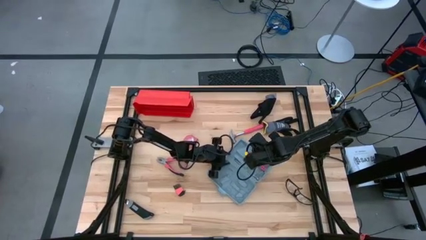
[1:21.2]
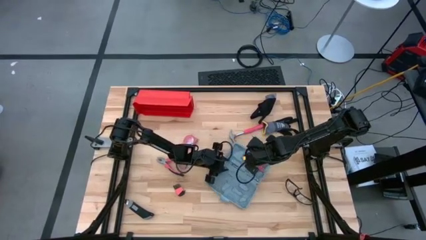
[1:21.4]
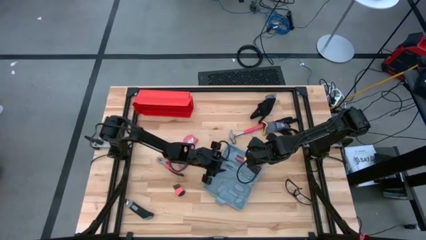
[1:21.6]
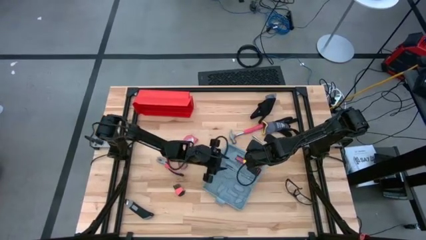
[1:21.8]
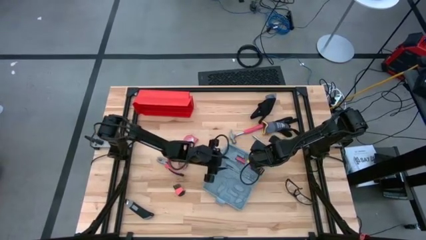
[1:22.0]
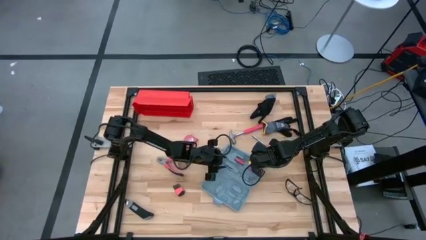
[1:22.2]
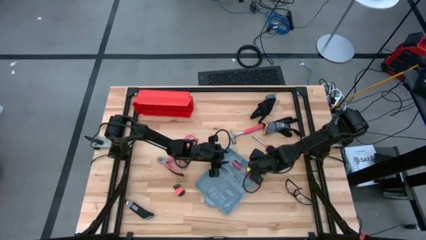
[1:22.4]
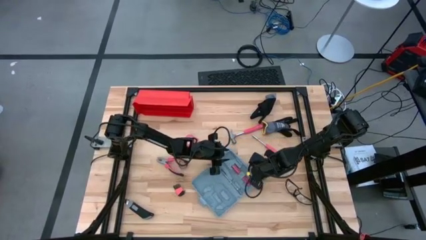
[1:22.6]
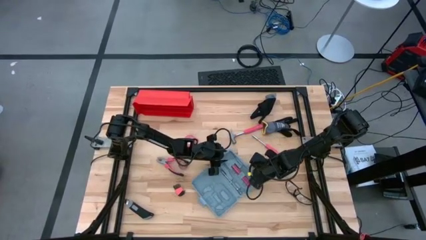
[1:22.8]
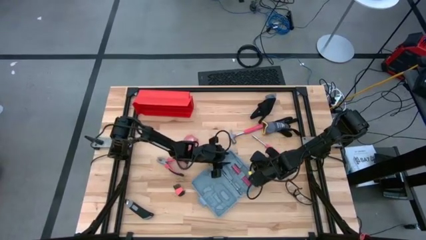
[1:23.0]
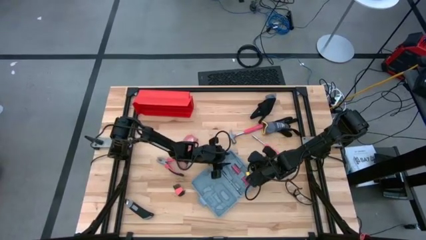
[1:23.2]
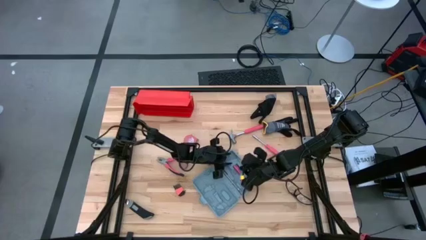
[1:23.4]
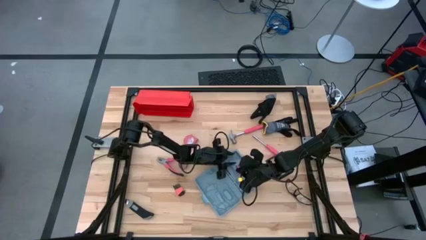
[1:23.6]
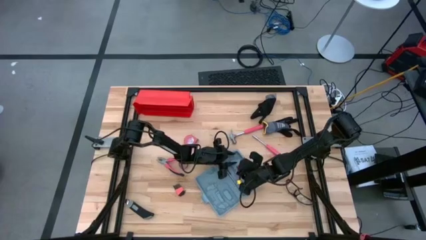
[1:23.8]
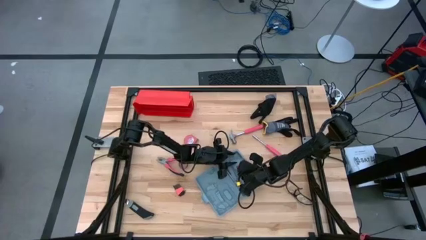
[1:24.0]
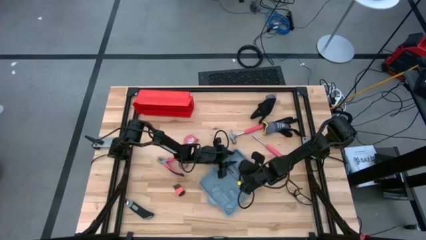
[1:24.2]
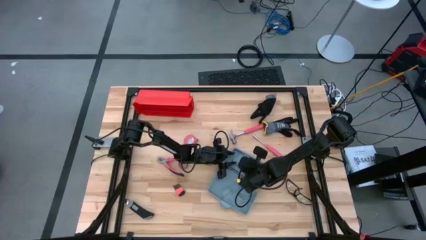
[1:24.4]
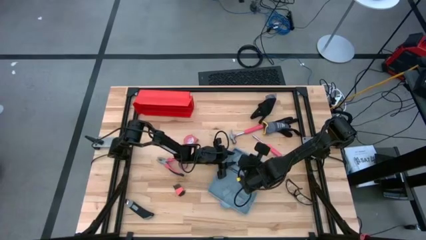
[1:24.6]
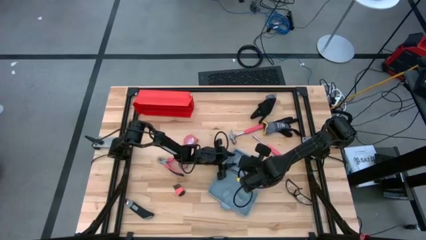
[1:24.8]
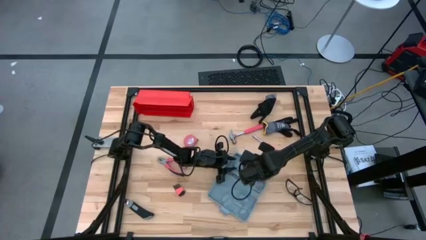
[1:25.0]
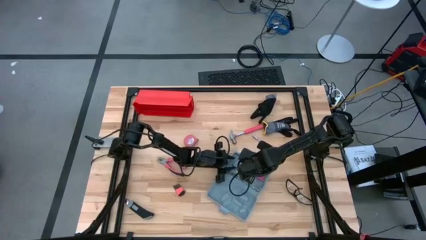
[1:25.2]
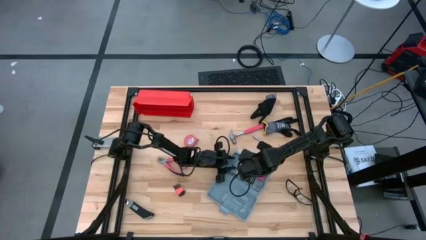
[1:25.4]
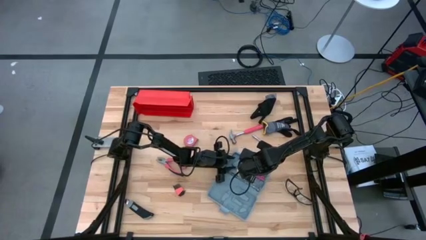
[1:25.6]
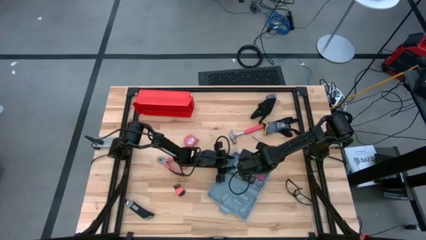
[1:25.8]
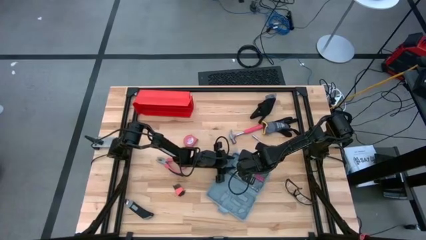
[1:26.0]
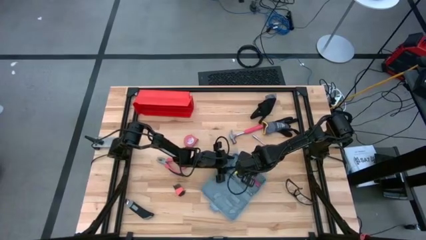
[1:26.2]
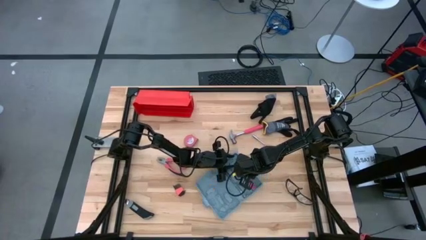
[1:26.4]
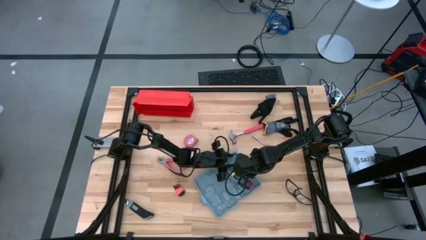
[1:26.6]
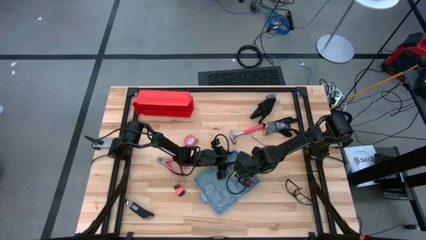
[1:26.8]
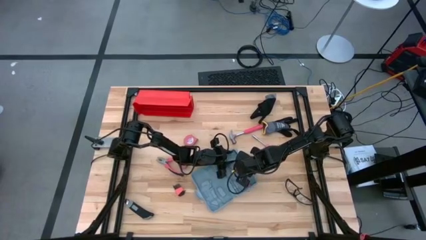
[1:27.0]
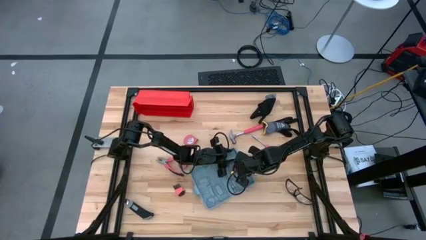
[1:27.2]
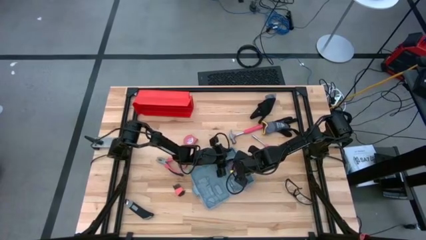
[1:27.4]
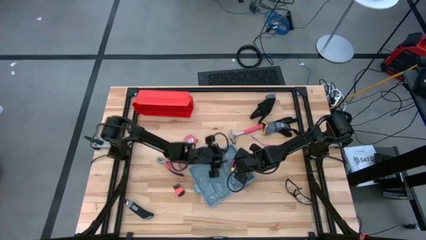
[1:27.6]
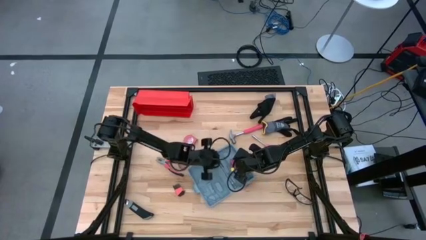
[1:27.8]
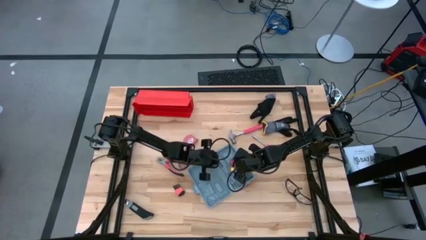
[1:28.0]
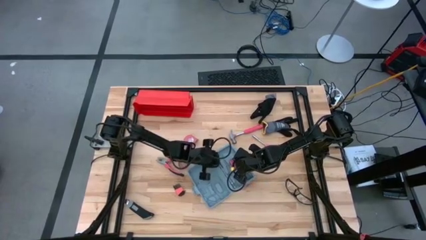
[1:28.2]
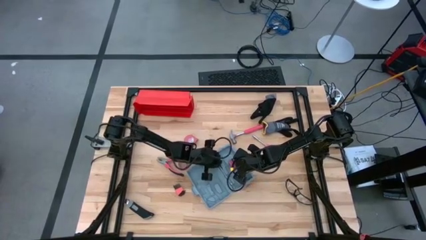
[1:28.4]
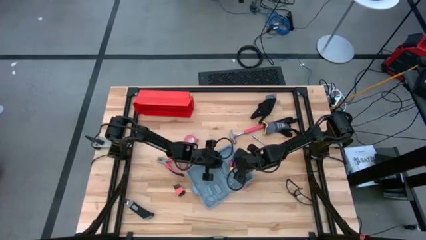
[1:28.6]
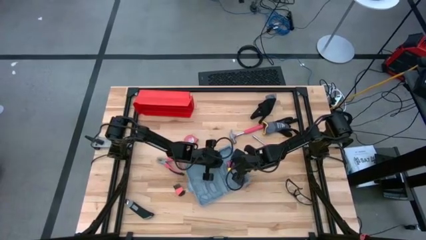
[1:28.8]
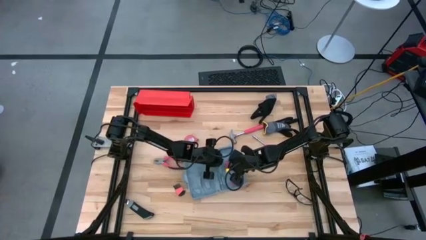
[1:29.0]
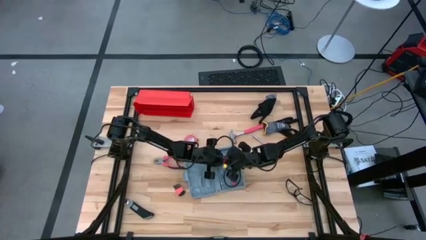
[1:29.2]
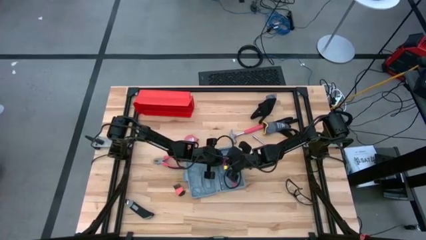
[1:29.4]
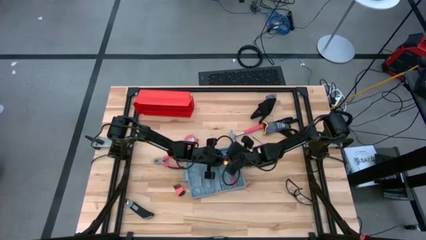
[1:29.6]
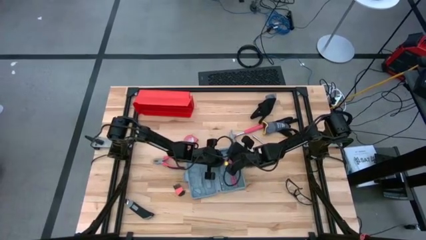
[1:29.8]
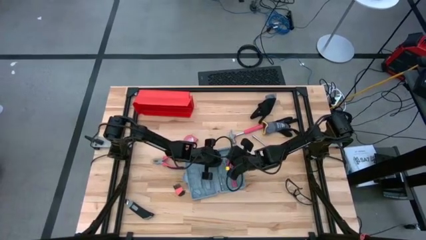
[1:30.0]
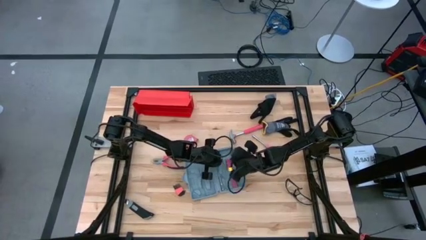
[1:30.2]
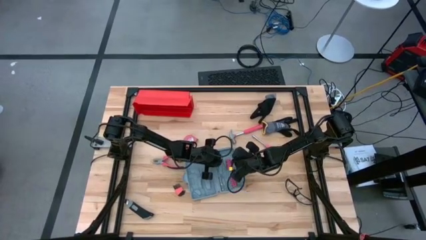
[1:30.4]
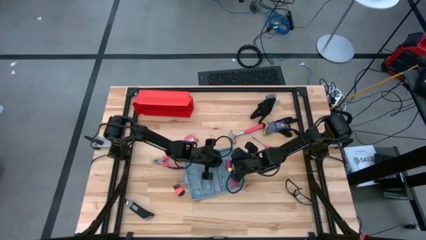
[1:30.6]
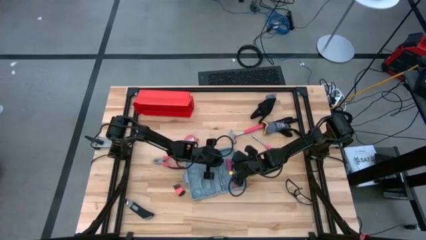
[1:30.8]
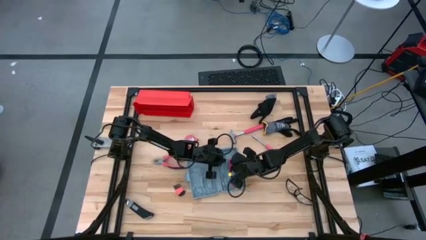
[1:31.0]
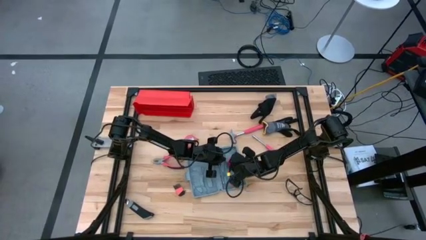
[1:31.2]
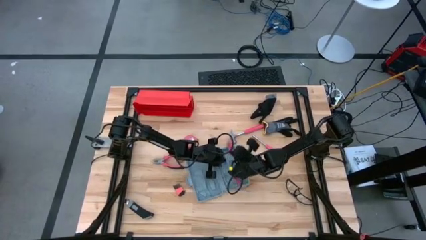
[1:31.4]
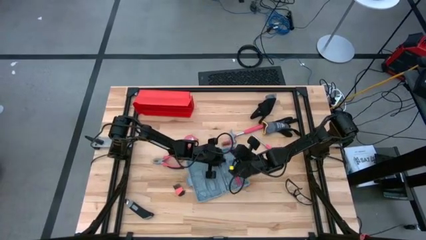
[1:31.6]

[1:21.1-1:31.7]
Task: prefit tool cases
Remove the top orange screwdriver bit set from the gray pre-fit tool case

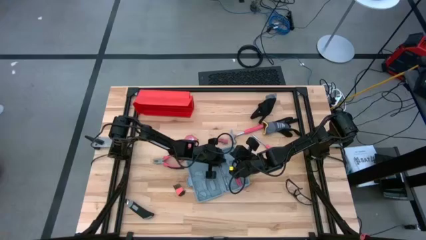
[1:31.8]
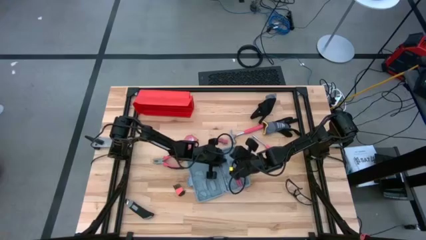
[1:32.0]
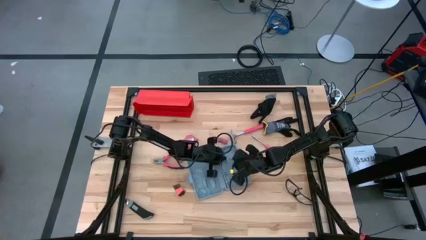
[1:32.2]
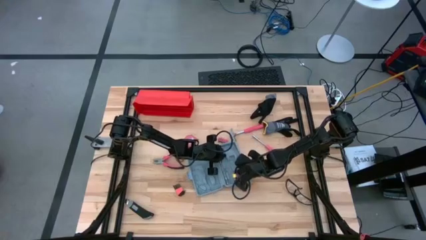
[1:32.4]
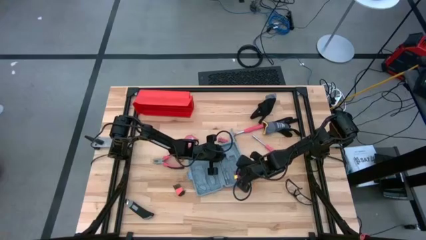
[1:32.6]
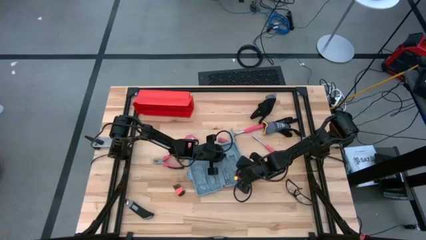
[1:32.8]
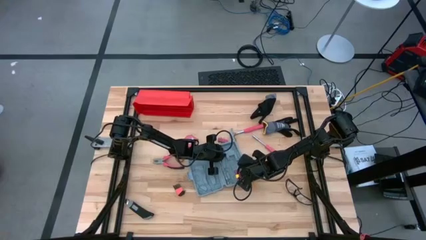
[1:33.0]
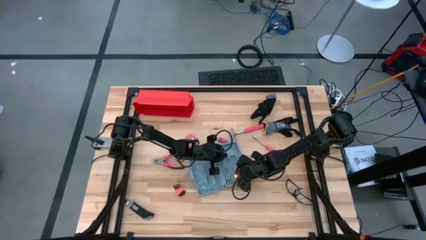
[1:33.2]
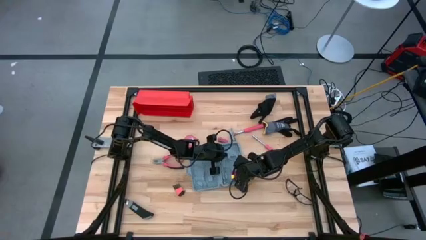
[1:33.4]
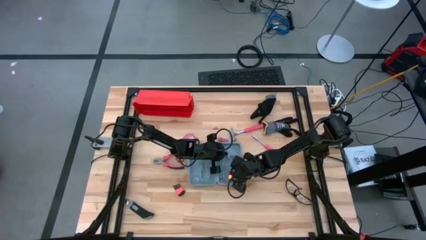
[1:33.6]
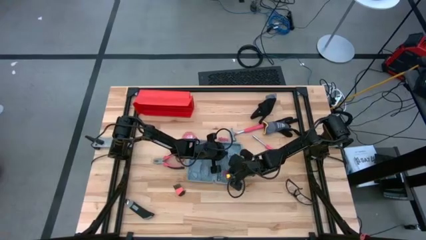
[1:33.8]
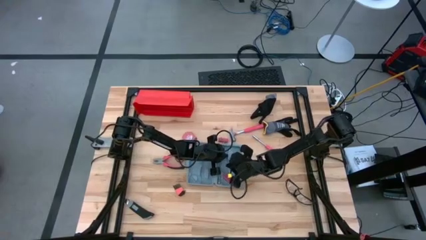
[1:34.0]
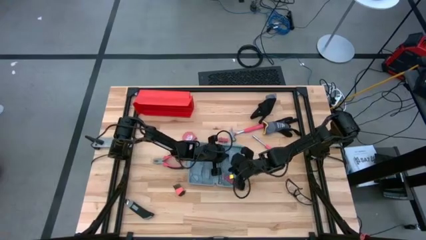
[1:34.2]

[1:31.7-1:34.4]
Remove the orange screwdriver bit set from the gray pre-fit tool case

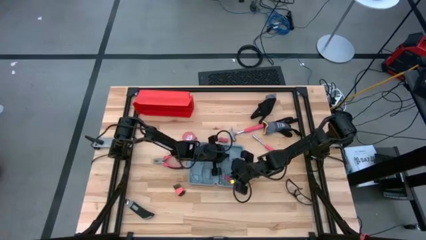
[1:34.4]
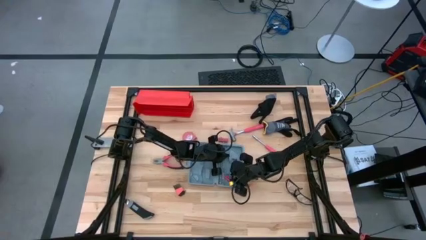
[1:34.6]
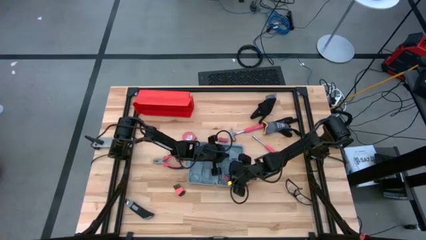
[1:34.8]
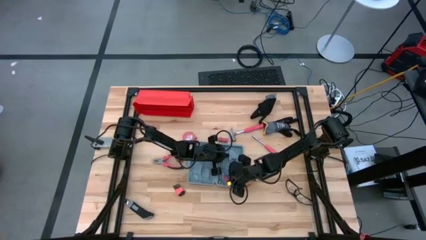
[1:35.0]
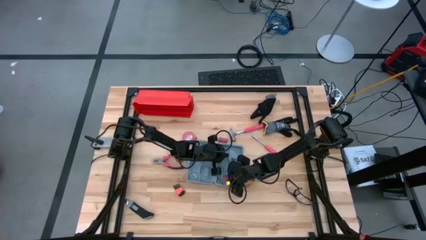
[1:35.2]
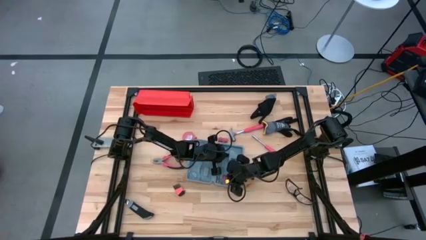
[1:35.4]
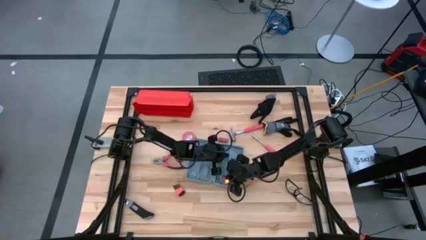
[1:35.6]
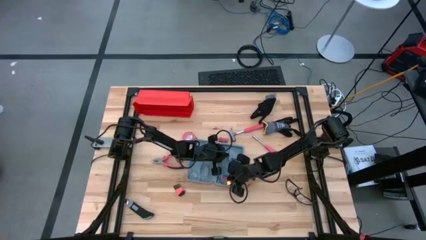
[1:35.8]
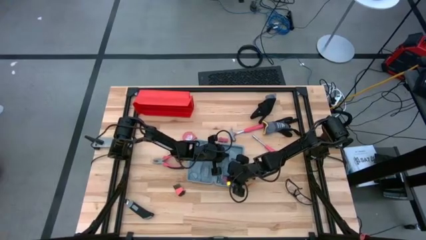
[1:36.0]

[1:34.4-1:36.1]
Remove the orange screwdriver bit set from the gray pre-fit tool case

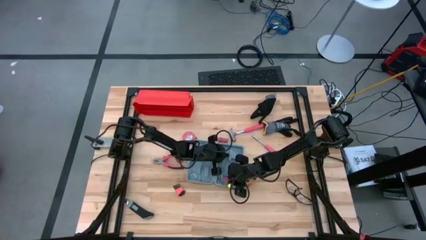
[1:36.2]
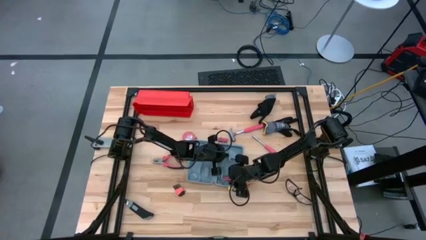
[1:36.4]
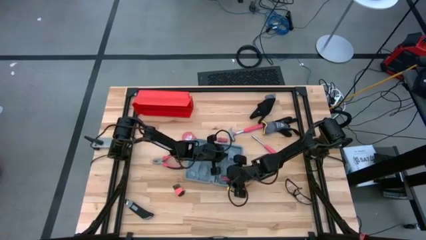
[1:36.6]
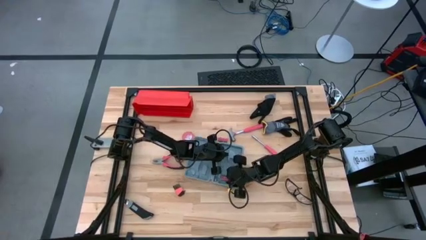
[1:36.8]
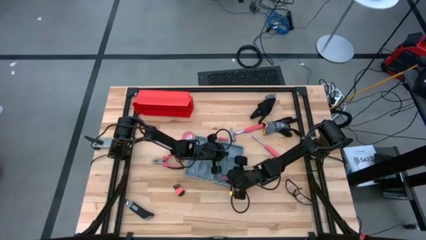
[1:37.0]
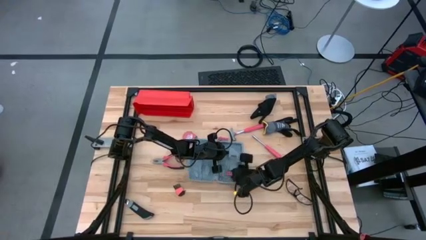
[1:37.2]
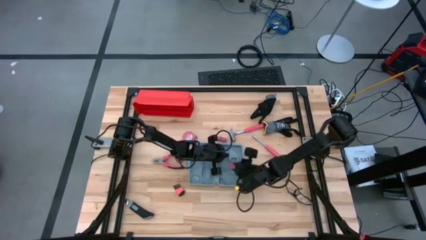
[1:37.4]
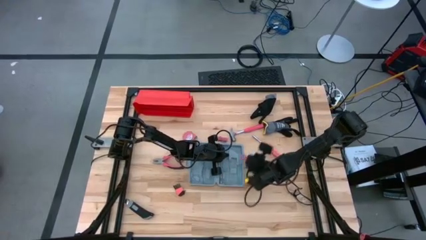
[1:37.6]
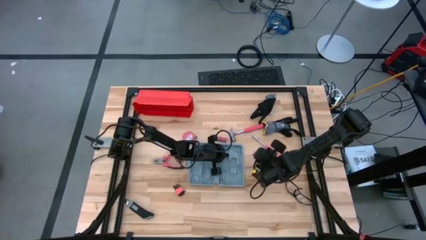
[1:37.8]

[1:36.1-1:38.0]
Remove the orange screwdriver bit set from the gray pre-fit tool case

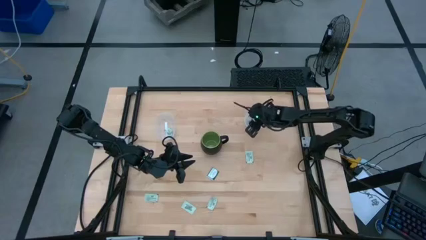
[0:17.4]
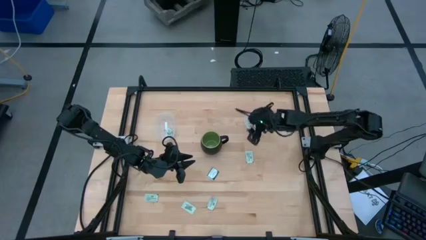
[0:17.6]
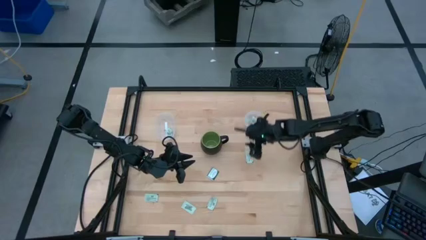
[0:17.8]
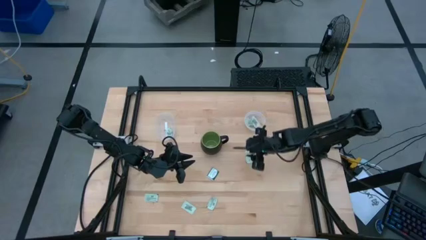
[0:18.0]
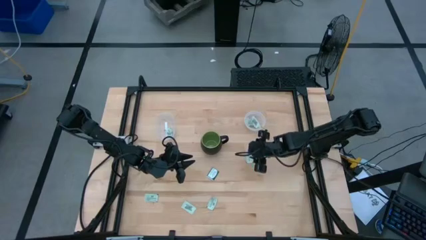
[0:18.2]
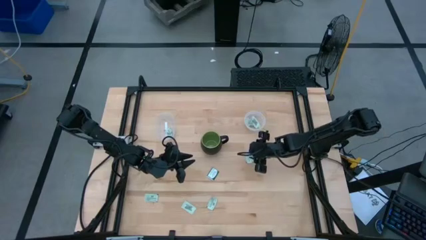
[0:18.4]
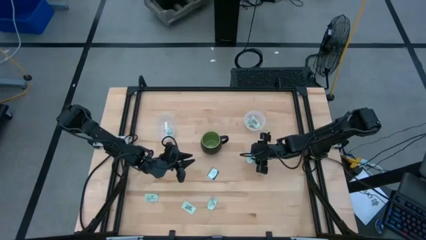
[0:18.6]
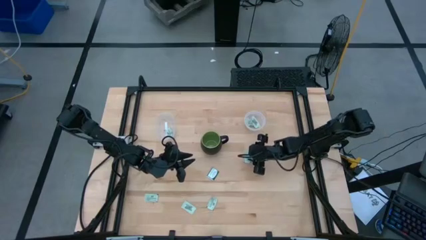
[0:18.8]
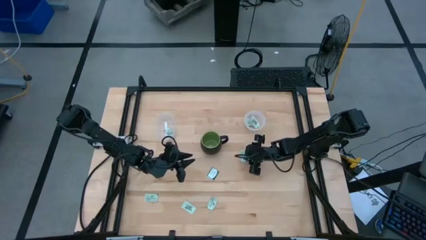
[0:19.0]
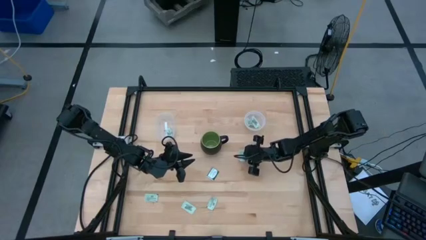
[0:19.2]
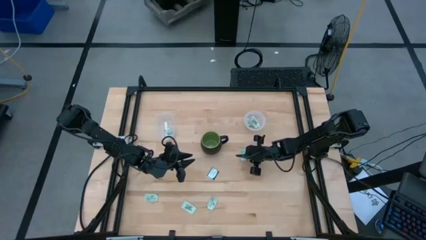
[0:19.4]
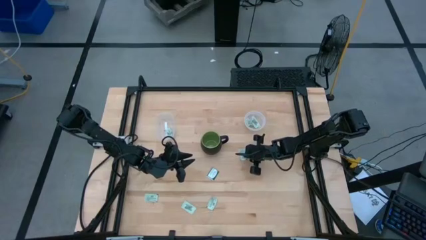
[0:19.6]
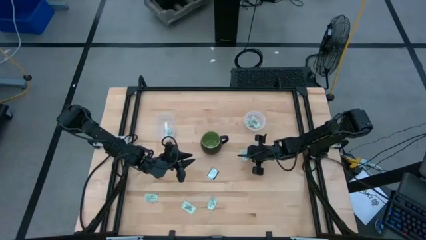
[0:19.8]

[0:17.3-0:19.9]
Task: Pick and place items into bin
Put the green stevia packet into the right transparent bin
